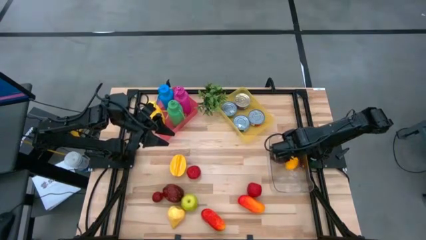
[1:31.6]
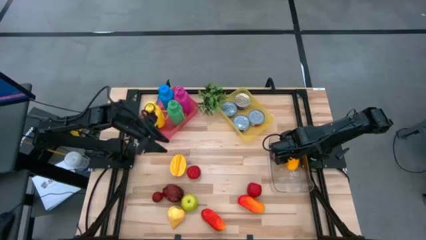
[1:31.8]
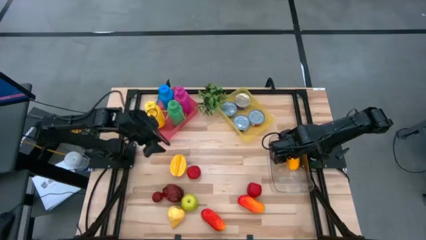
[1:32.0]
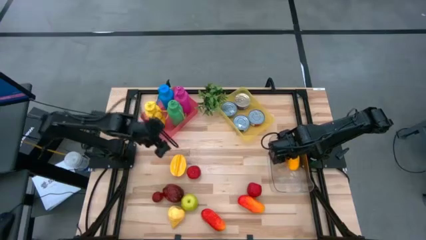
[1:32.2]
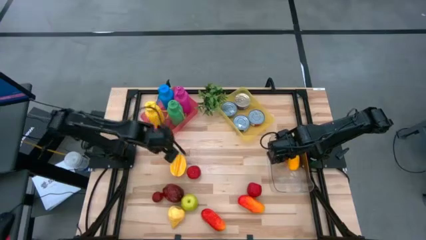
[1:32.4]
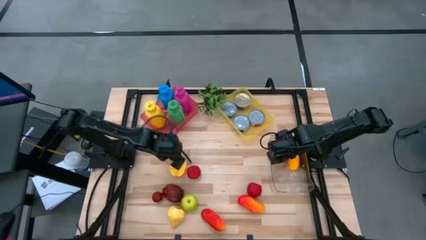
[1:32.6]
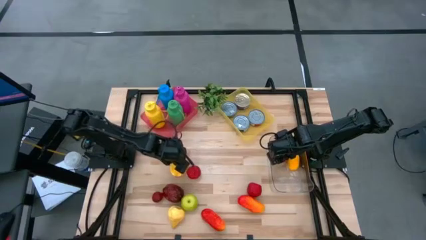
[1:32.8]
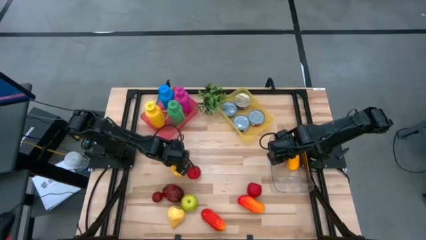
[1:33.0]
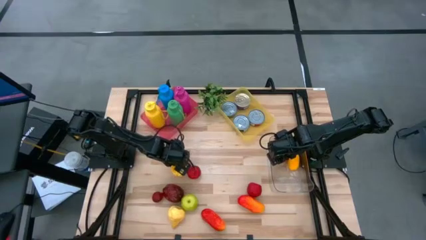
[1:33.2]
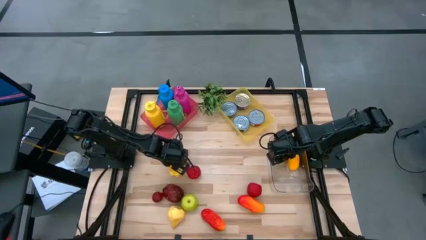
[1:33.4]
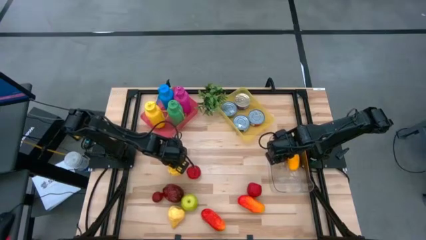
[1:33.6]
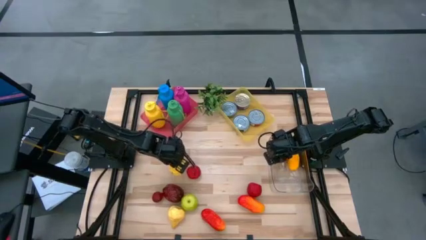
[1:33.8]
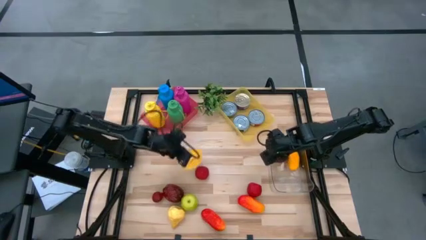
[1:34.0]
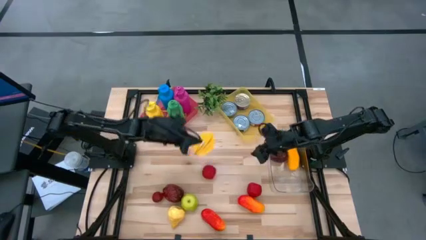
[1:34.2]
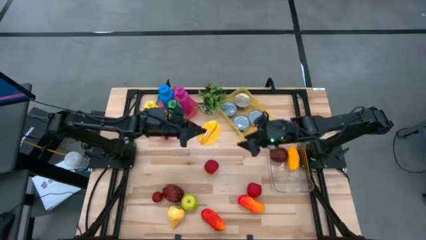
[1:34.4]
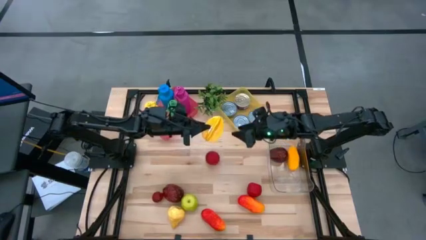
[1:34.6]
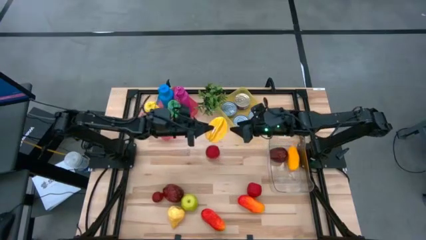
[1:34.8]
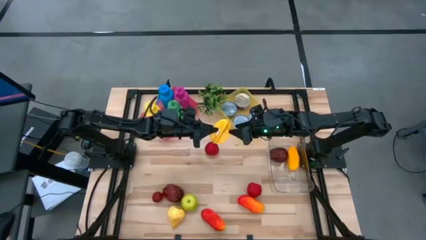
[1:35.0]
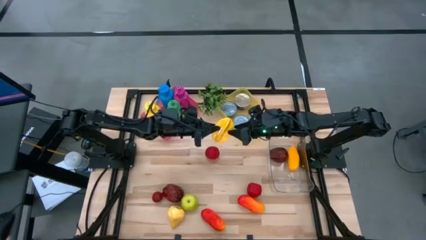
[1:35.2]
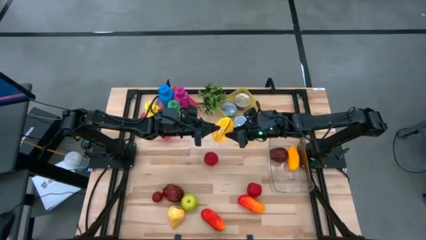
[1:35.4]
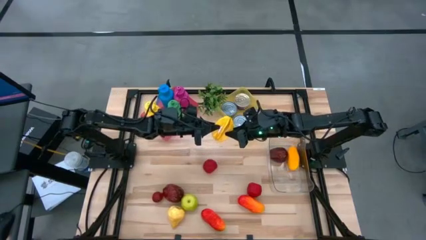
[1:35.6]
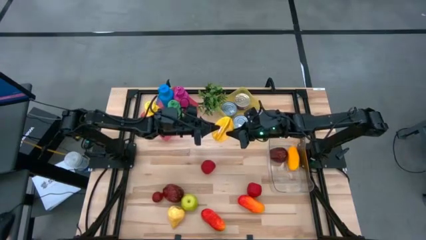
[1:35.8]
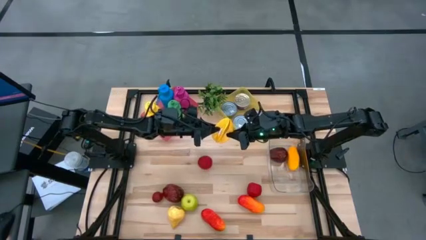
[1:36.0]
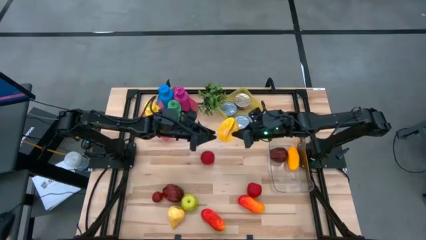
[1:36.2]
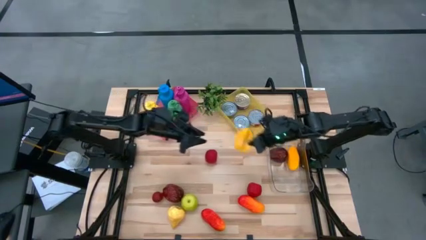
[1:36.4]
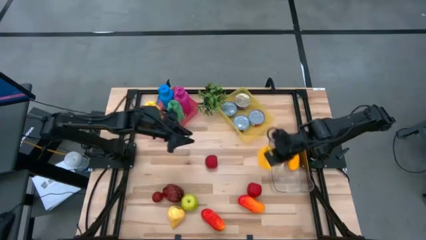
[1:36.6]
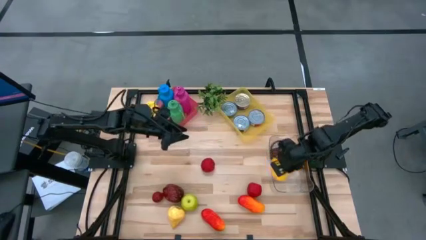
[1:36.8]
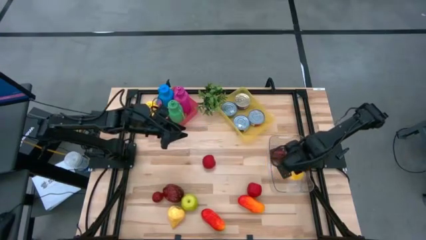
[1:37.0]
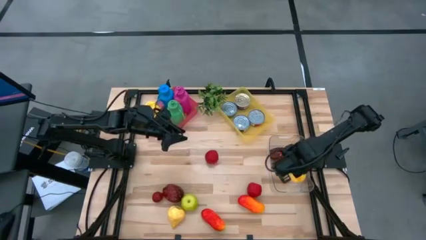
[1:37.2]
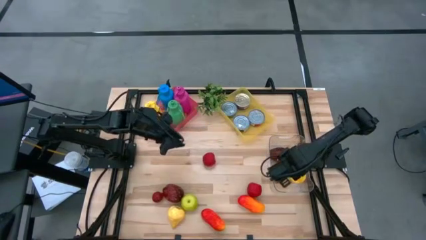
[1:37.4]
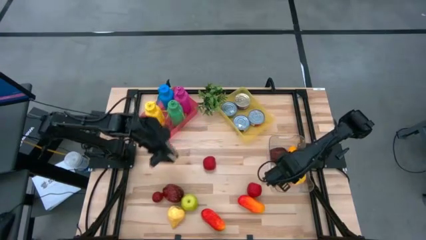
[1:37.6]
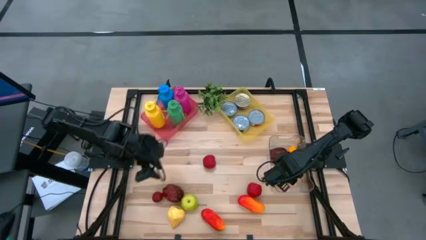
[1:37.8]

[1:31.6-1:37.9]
Task: Pick & Place Food Item
Put the starfruit into the transparent bin

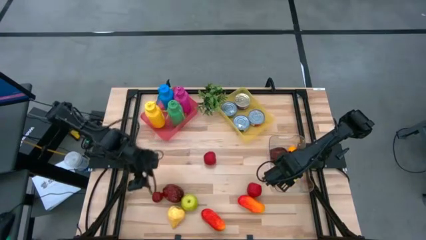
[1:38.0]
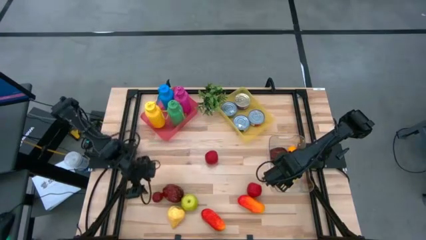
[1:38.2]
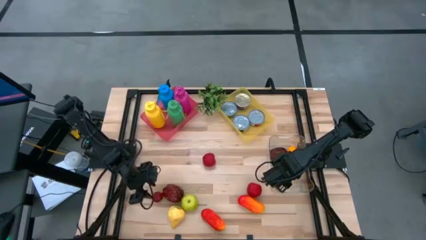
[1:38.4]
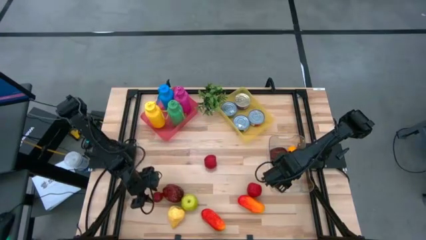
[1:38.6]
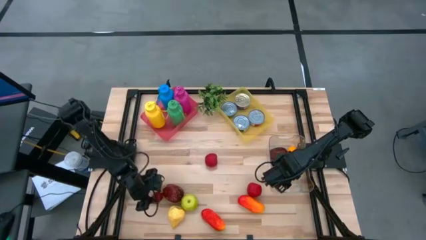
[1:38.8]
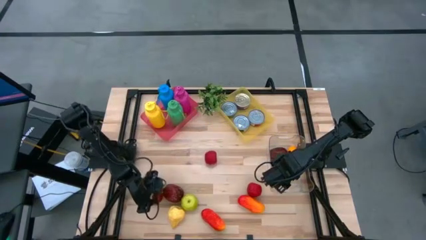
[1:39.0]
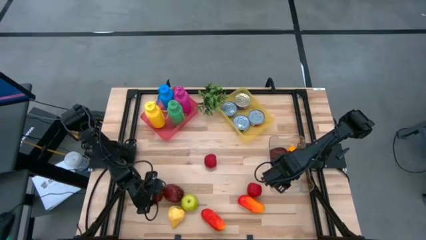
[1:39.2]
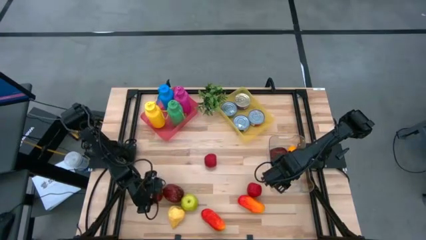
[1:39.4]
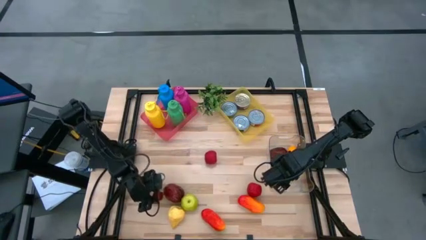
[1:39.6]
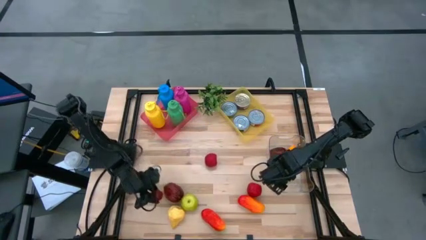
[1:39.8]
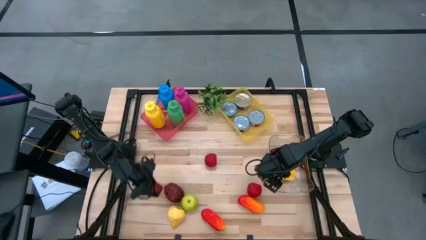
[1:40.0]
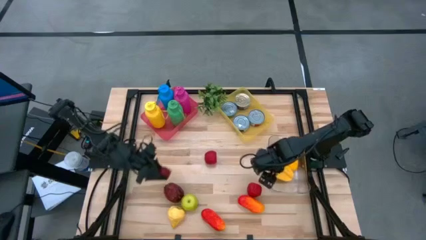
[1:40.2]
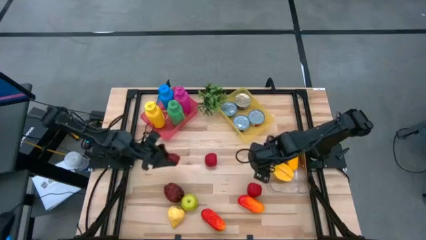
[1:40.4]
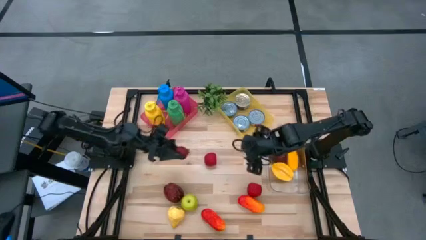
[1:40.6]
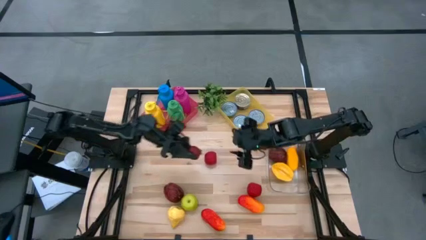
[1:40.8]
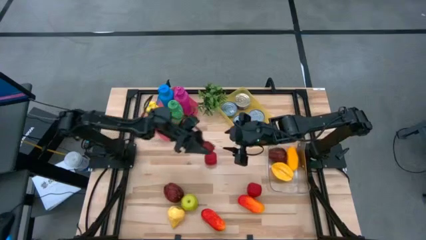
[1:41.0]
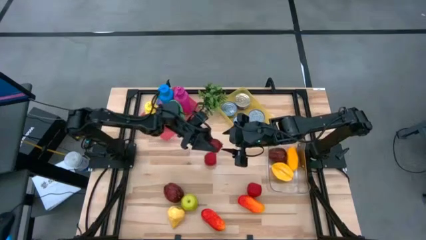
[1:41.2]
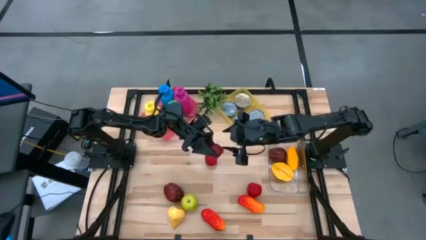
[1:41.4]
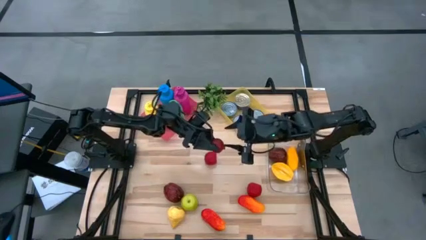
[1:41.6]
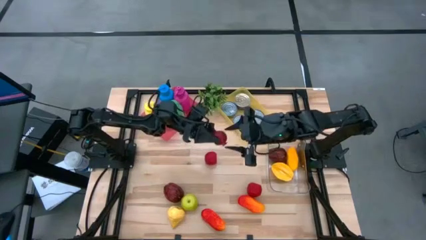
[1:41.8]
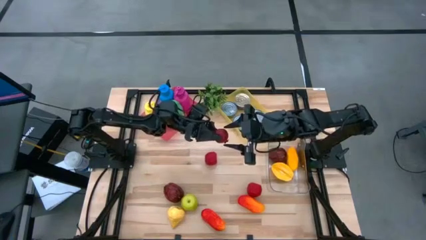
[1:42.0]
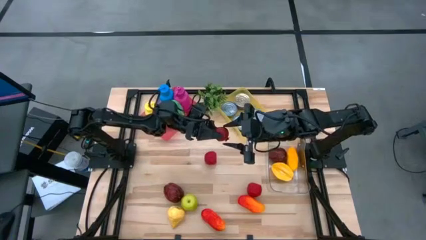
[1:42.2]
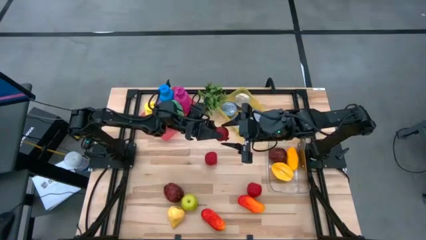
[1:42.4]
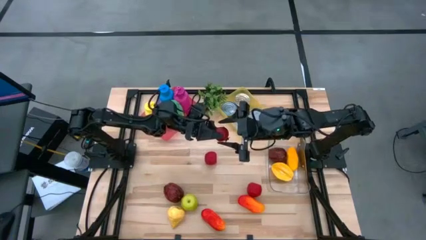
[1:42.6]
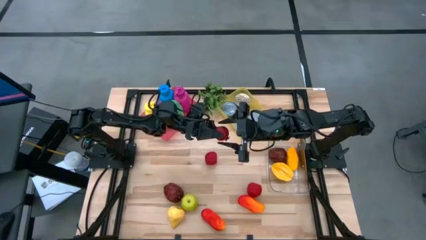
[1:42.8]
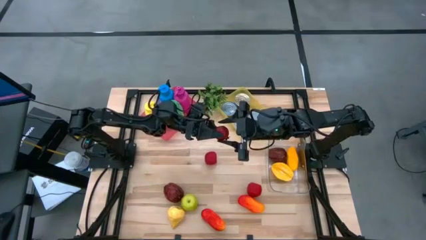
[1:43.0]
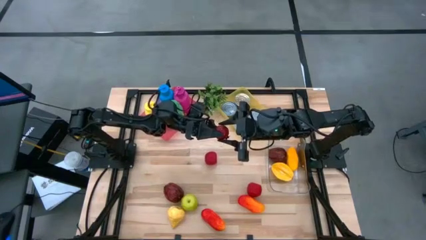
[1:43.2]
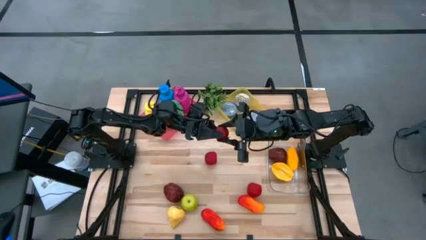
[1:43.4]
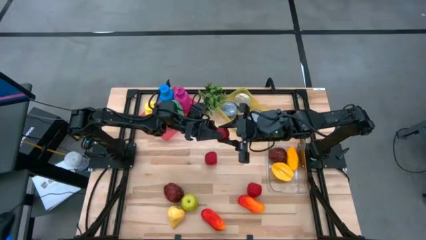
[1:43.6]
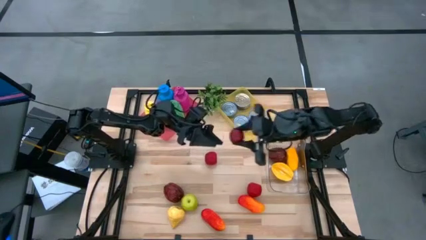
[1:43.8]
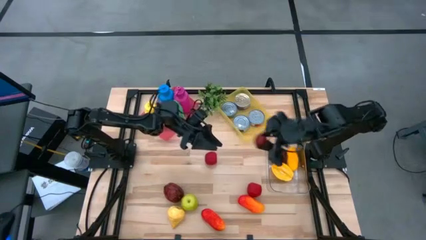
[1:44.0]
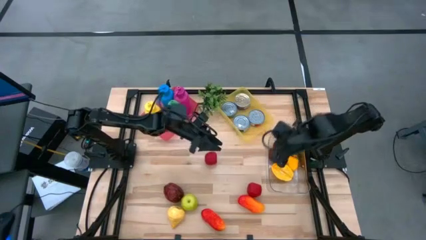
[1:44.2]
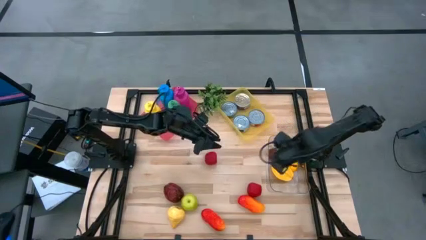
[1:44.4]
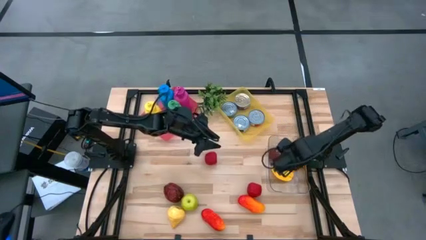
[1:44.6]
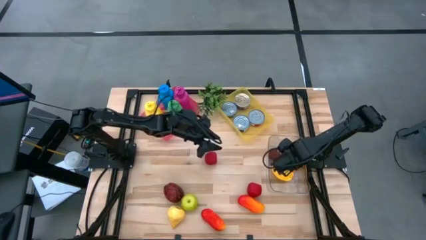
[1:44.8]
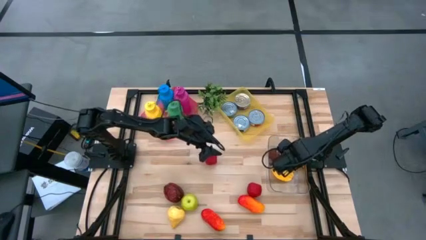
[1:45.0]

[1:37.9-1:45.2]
Put the pomegranate into the transparent bin

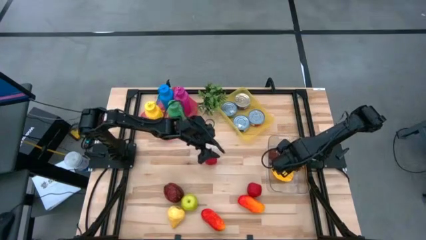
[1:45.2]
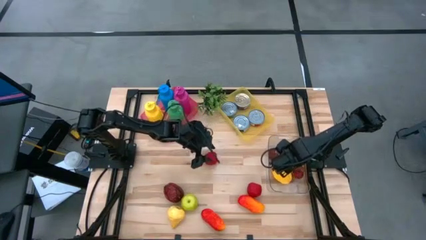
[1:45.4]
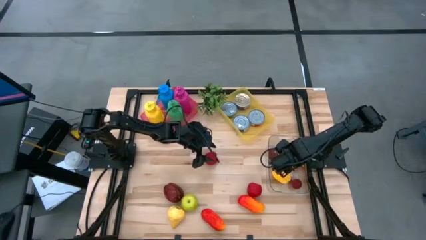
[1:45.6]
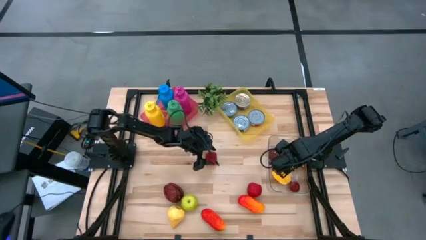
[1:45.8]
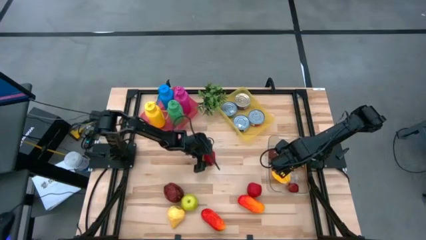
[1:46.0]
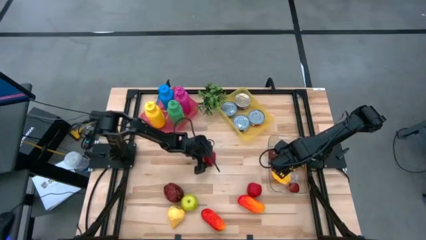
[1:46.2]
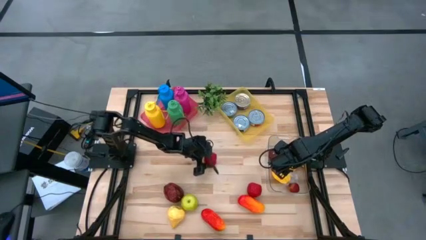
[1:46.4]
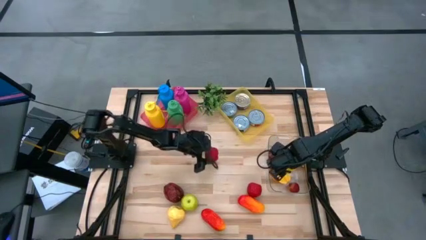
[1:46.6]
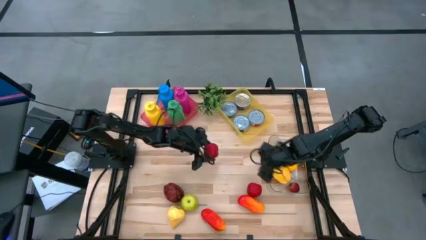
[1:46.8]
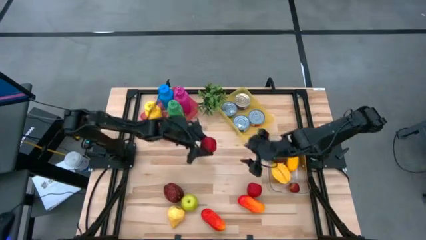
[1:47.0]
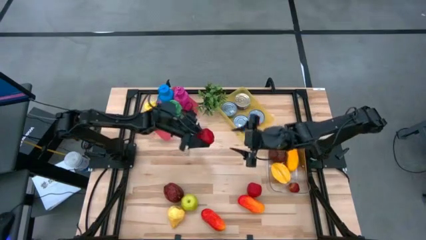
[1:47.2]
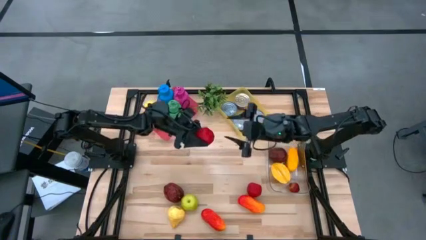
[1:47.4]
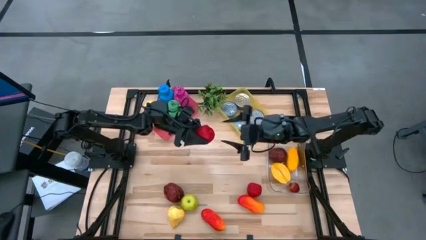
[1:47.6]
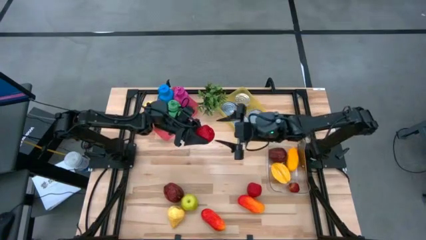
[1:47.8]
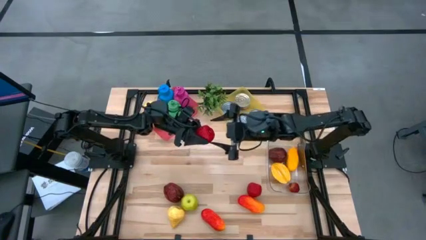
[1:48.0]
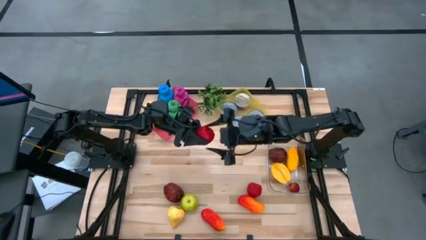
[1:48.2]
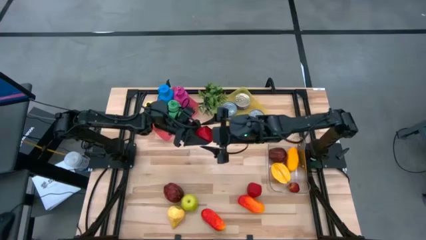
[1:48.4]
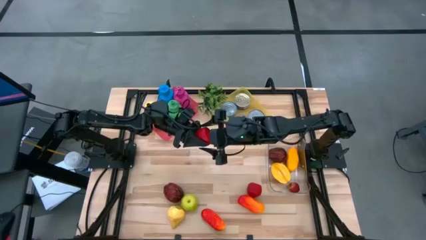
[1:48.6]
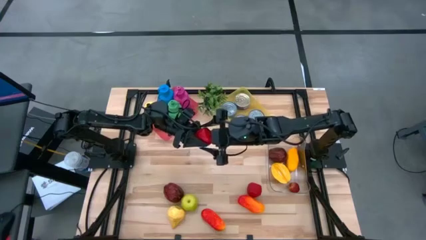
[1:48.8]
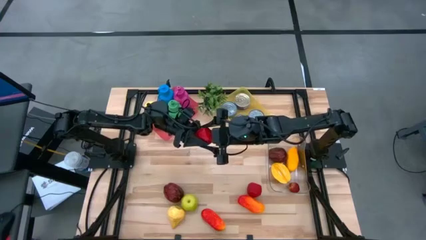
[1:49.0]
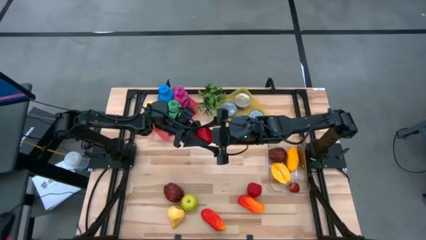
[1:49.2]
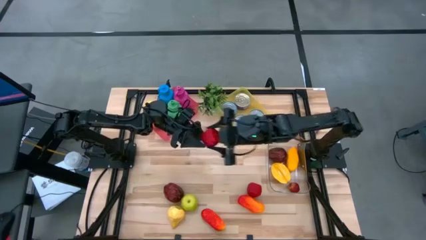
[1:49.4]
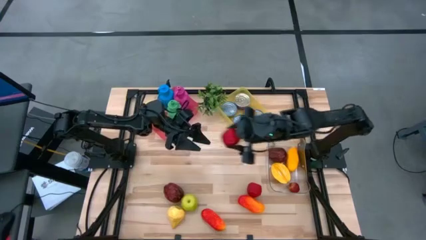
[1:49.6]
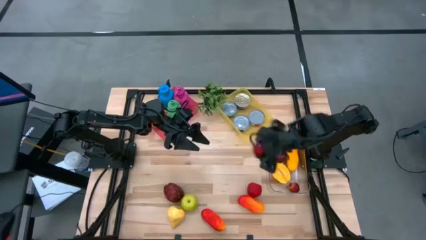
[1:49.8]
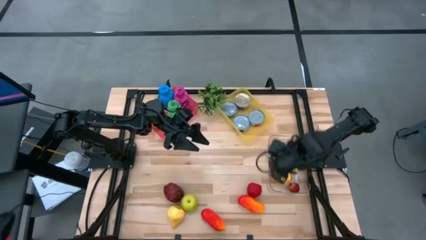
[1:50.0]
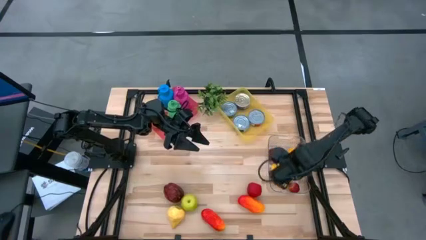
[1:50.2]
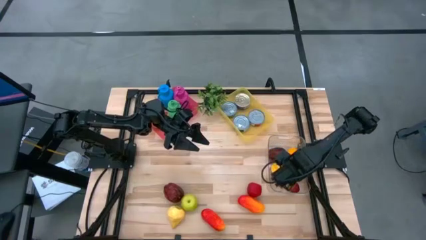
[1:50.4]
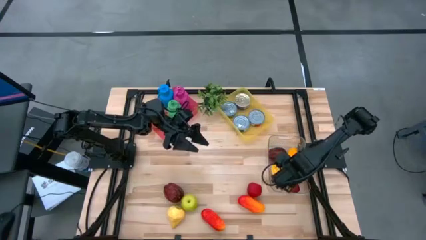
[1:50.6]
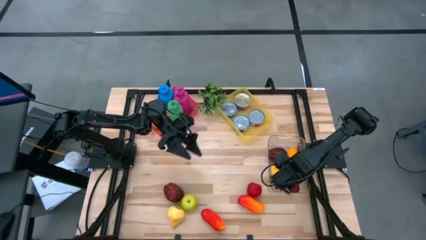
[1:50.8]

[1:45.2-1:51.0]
Put the top red apple into the transparent bin
